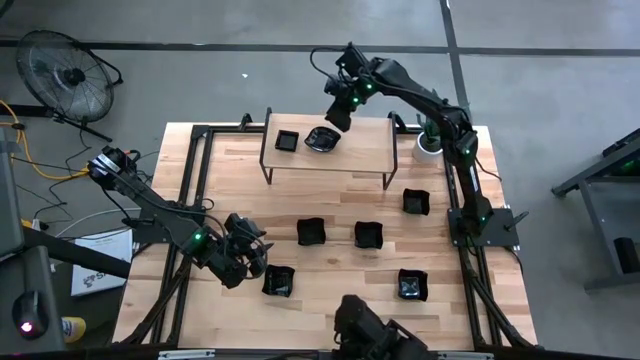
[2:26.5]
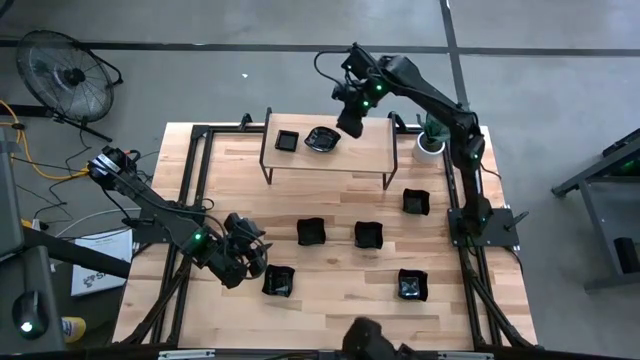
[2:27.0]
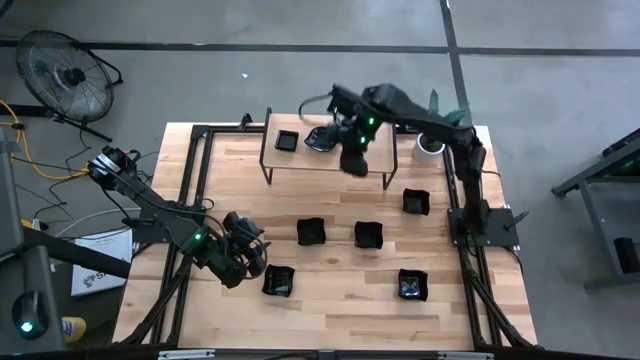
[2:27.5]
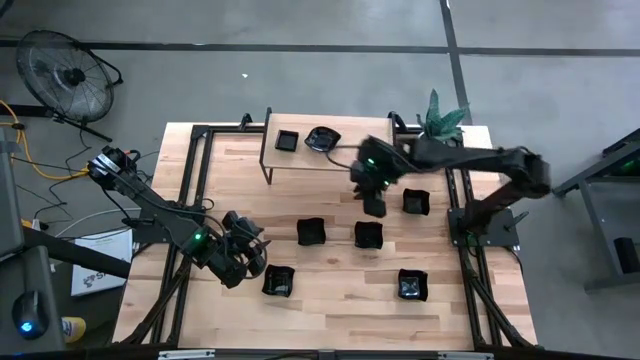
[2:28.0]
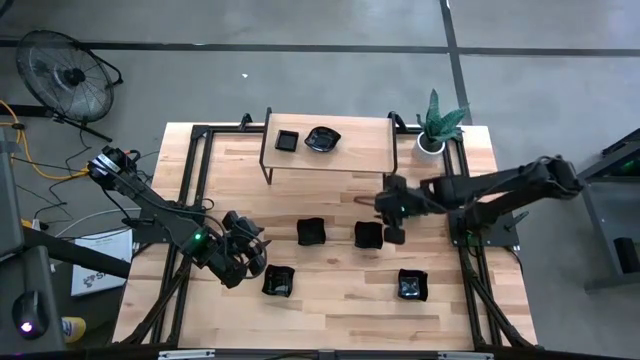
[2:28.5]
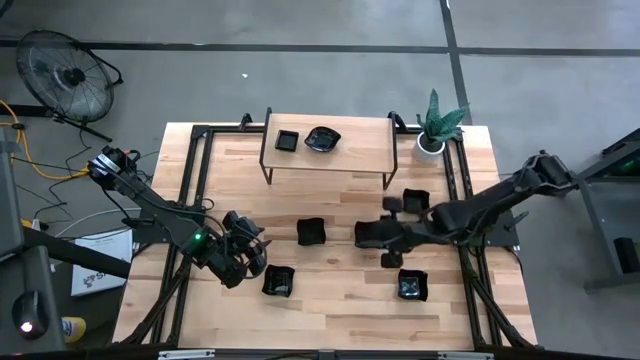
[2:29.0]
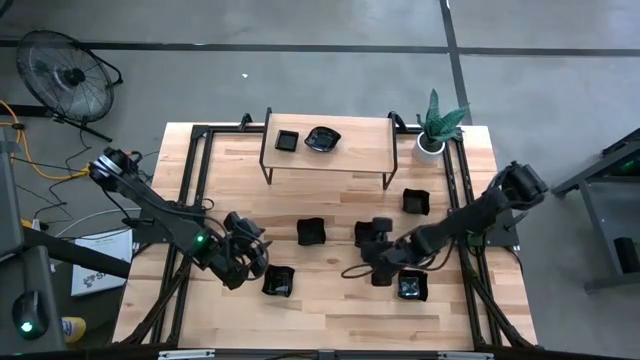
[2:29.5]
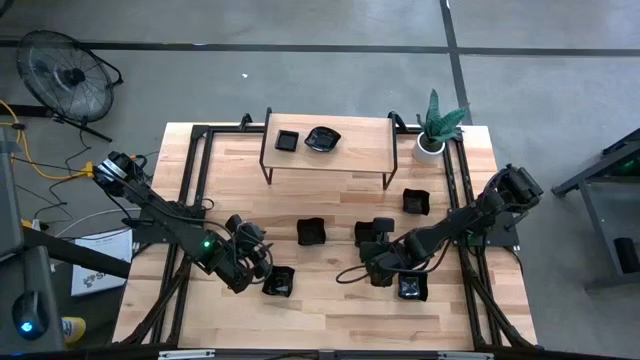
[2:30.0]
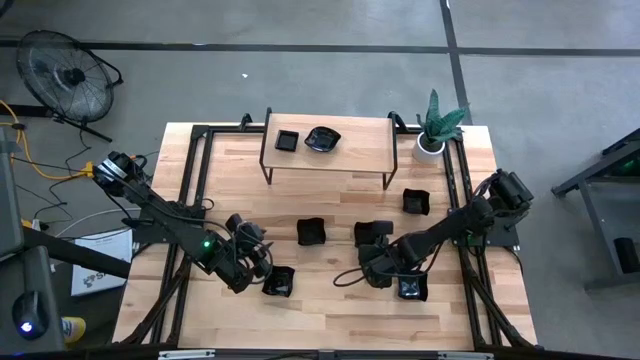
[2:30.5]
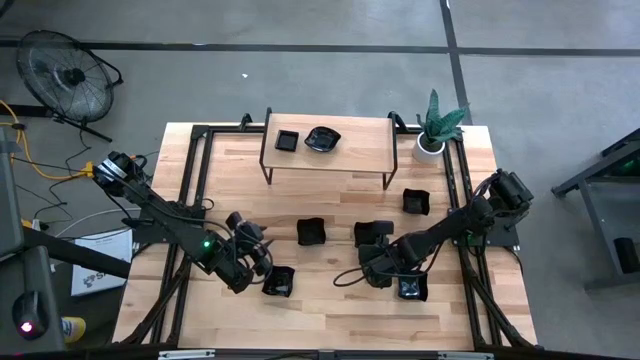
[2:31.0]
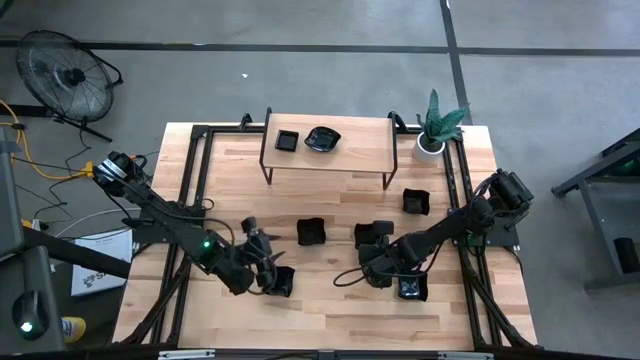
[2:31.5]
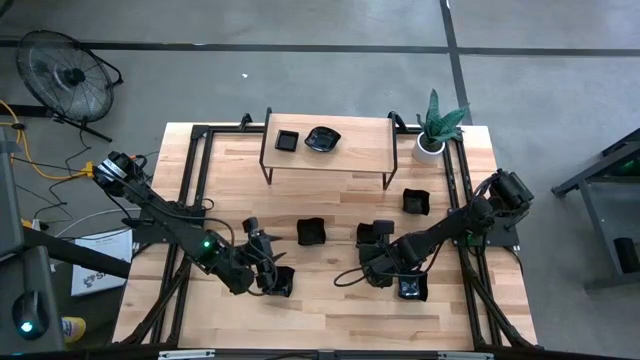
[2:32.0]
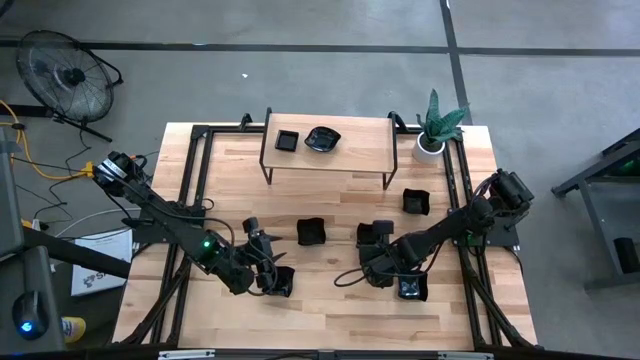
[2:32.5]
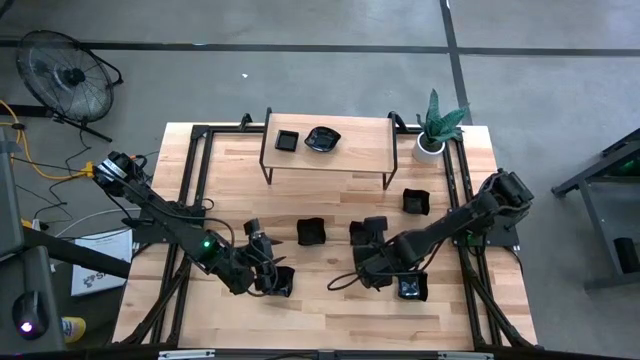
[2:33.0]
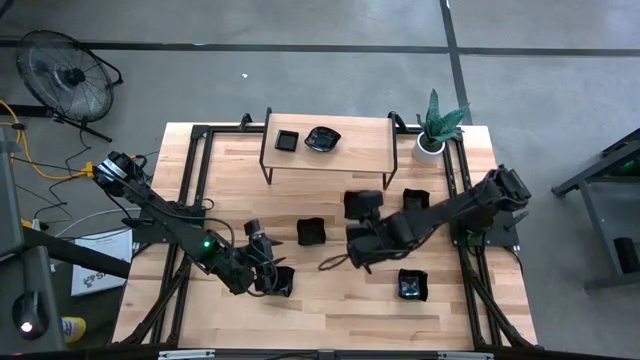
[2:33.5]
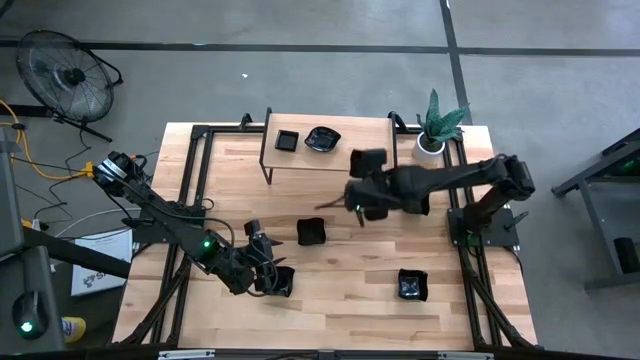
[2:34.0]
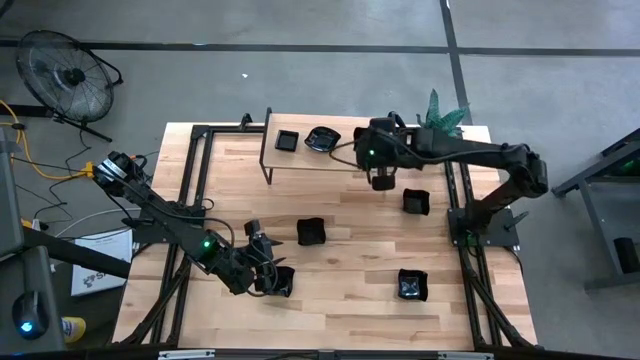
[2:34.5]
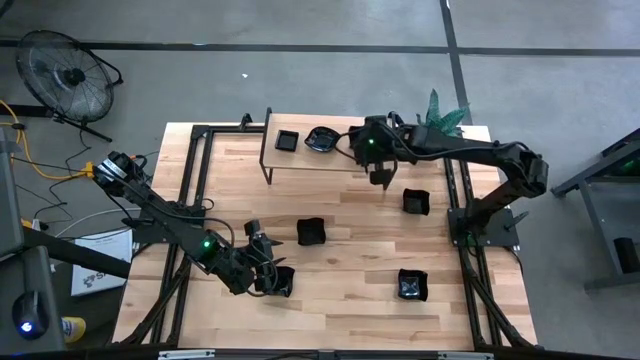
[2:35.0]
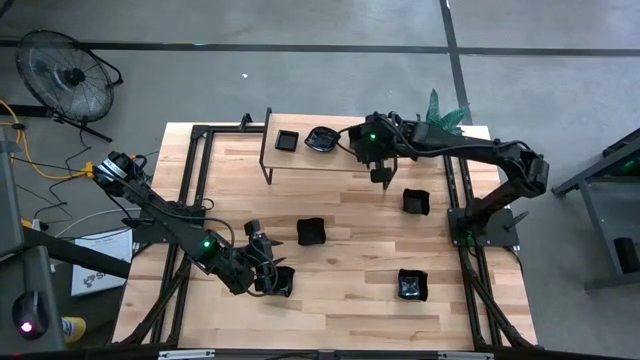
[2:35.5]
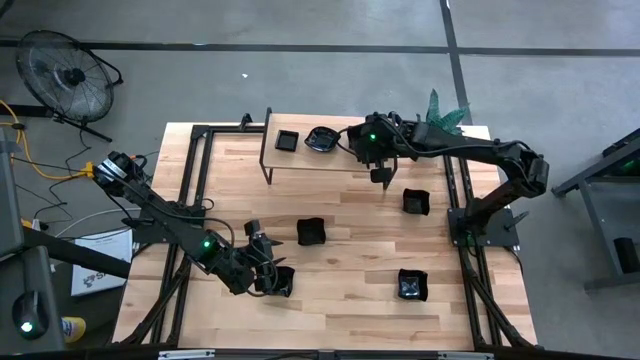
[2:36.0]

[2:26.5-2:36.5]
Task: Pick & Place Mini shaped plates
Put the black distorted square plate on the shelf

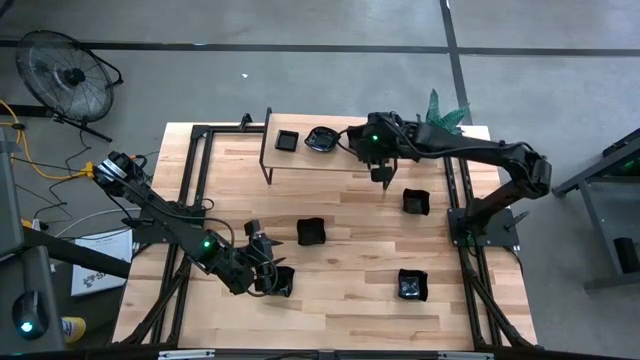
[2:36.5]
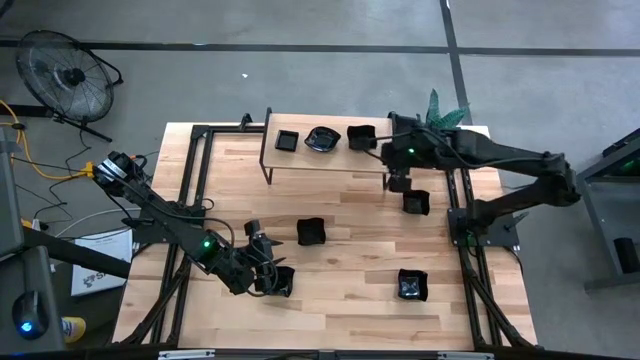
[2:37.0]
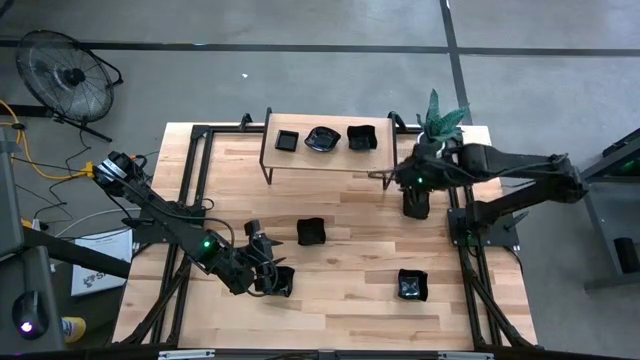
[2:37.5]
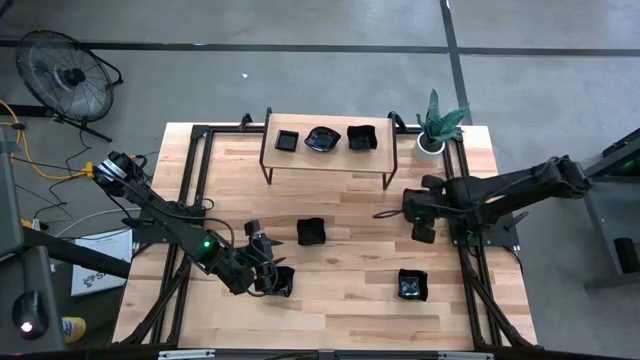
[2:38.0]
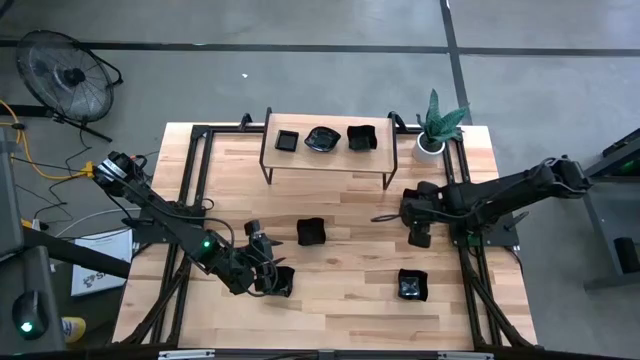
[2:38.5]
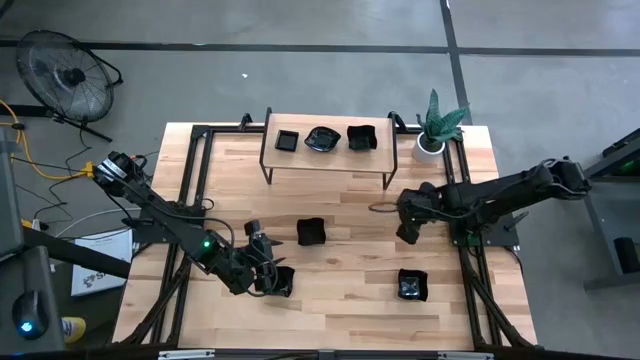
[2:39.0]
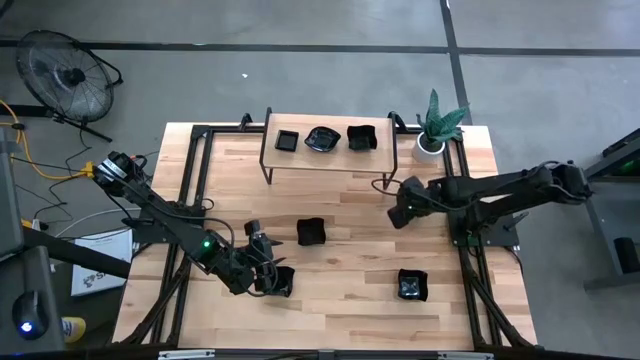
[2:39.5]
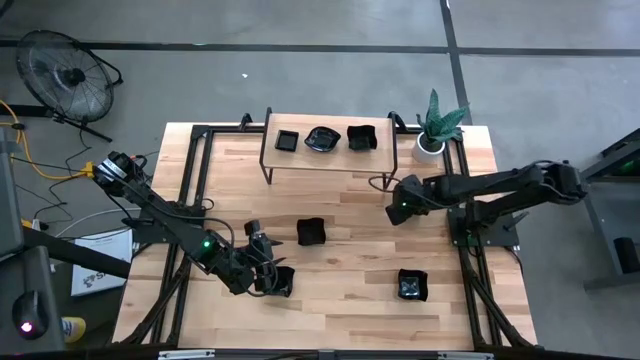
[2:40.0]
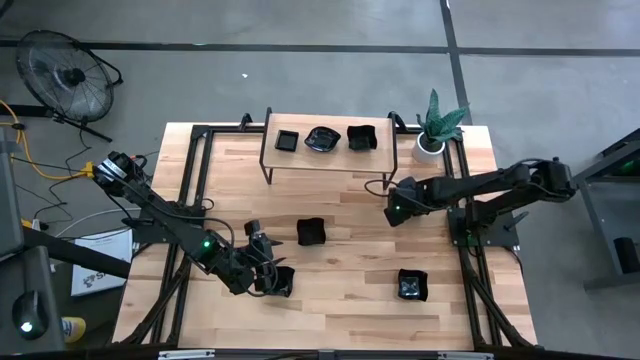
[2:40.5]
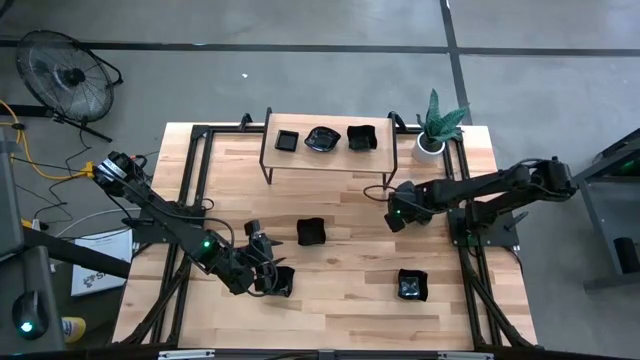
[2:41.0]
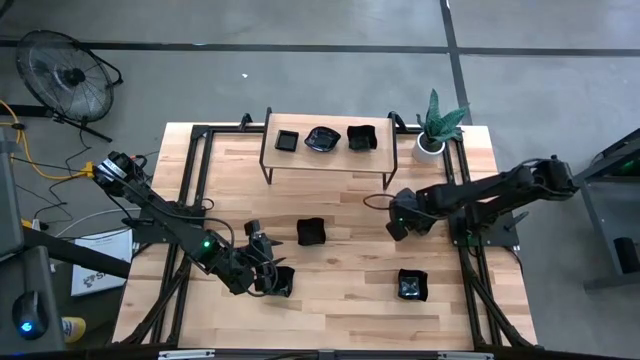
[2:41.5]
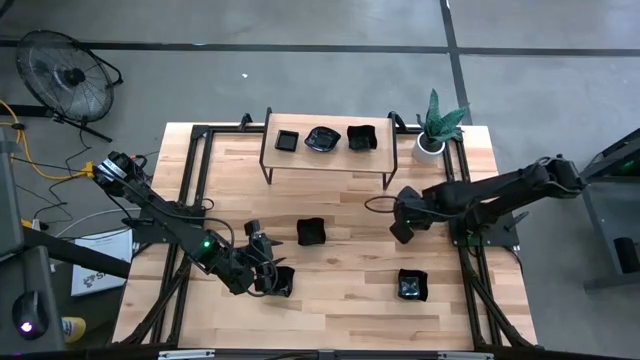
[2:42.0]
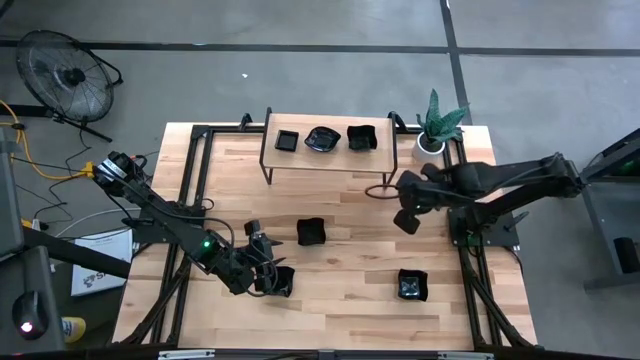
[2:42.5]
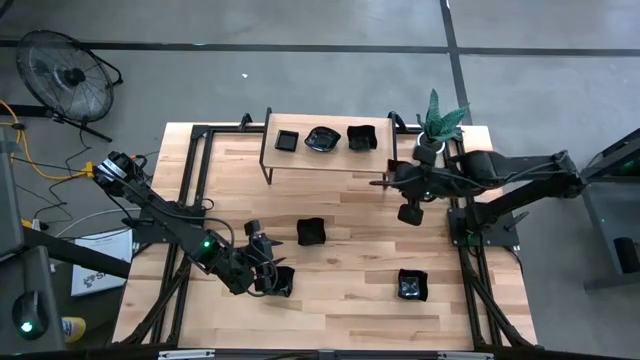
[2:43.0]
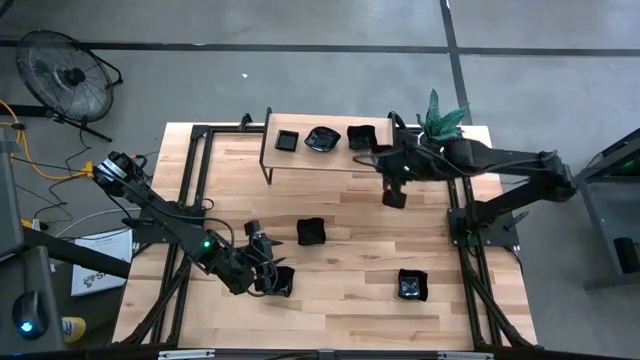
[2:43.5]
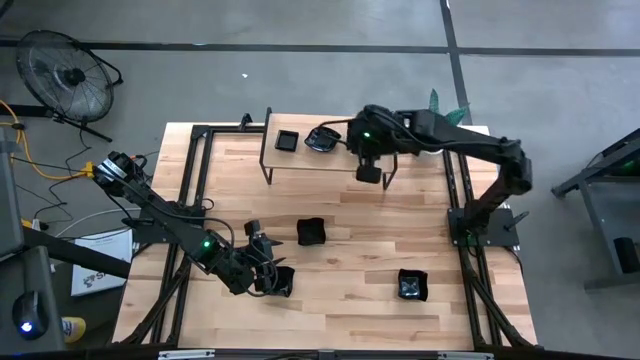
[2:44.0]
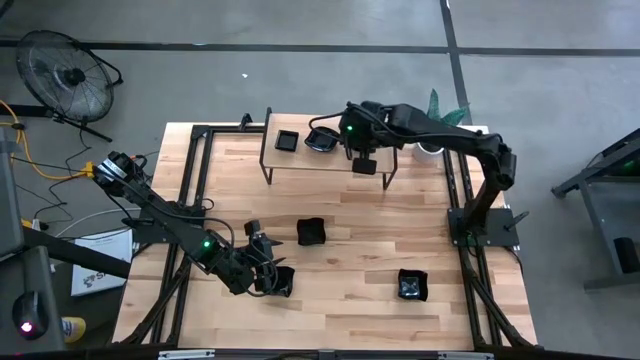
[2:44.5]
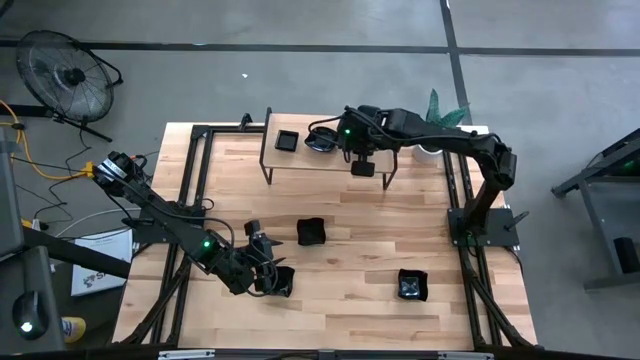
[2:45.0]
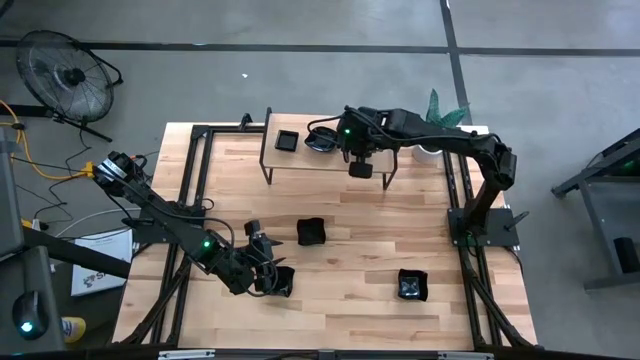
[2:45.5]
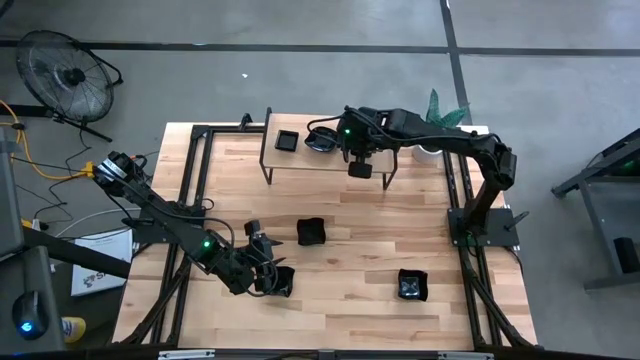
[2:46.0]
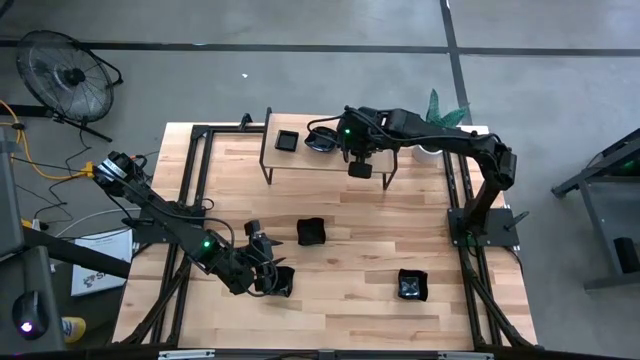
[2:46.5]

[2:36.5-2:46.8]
Stack the black distorted square plate on top of the black distorted square plate on the shelf
